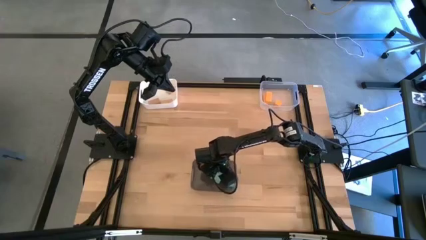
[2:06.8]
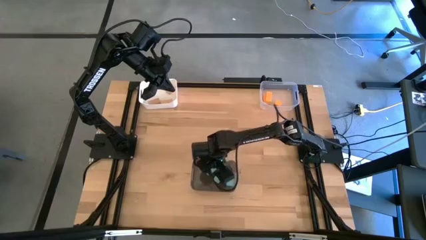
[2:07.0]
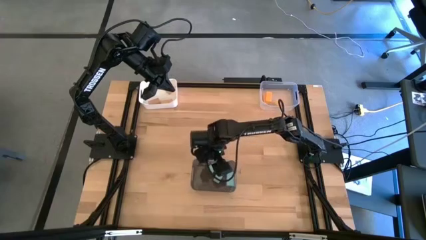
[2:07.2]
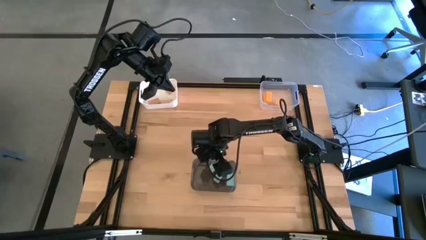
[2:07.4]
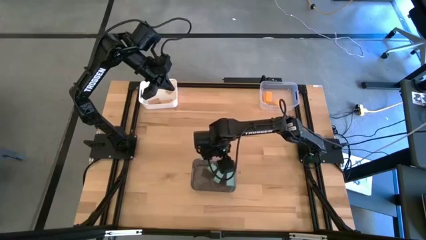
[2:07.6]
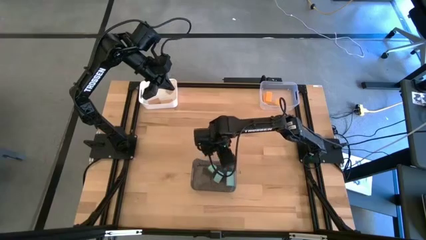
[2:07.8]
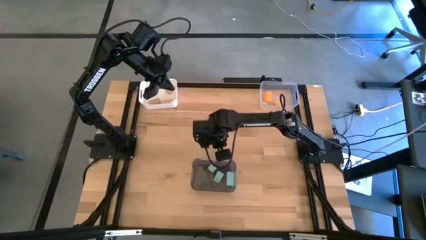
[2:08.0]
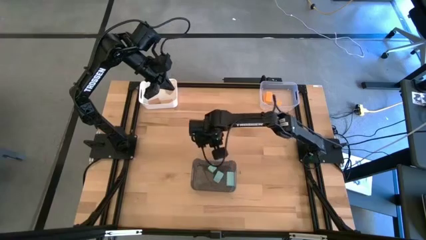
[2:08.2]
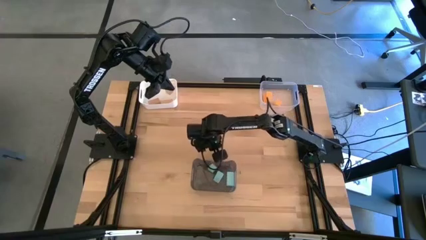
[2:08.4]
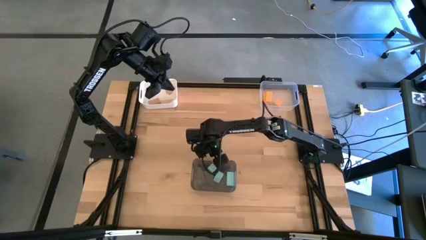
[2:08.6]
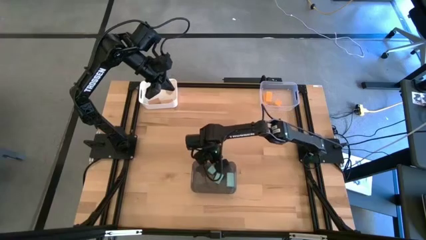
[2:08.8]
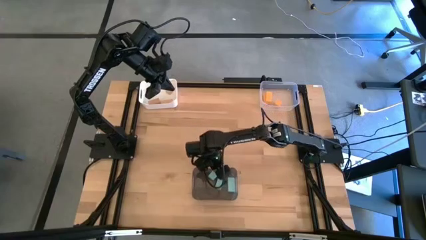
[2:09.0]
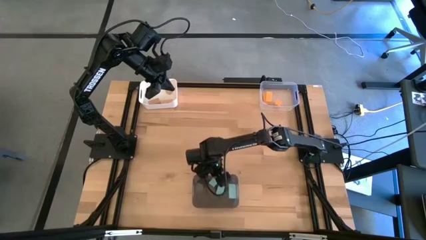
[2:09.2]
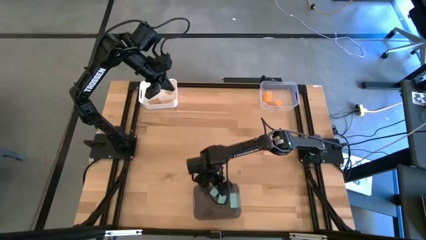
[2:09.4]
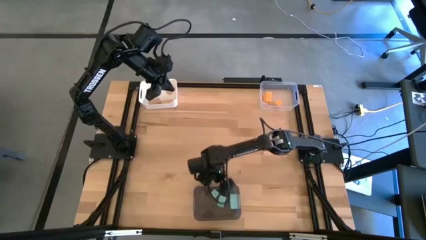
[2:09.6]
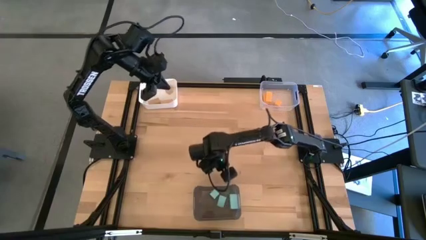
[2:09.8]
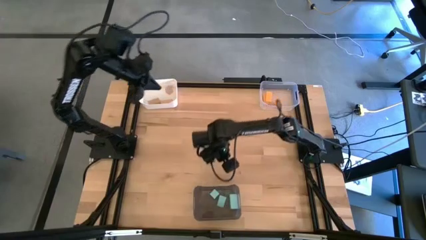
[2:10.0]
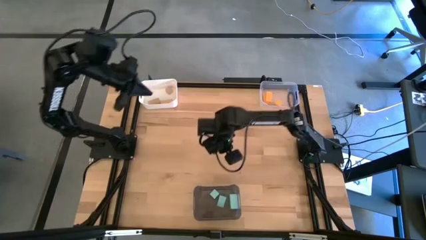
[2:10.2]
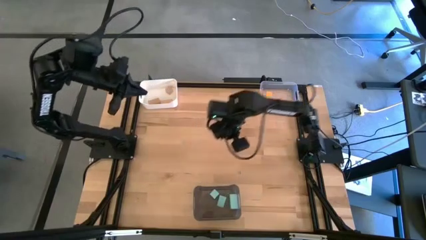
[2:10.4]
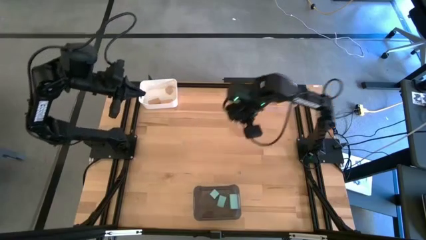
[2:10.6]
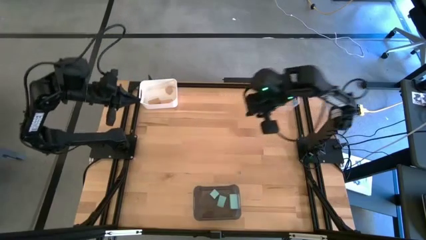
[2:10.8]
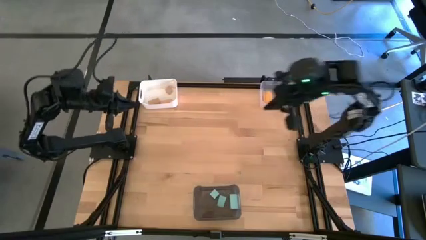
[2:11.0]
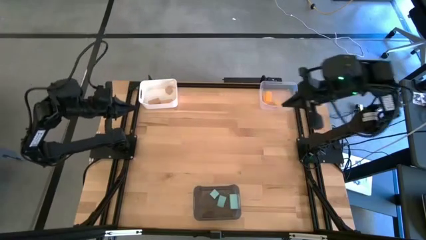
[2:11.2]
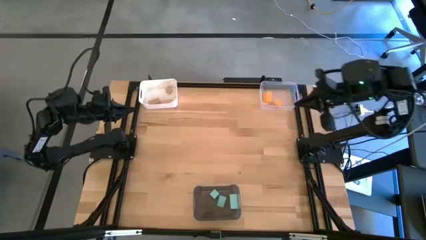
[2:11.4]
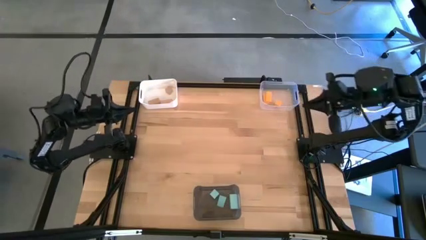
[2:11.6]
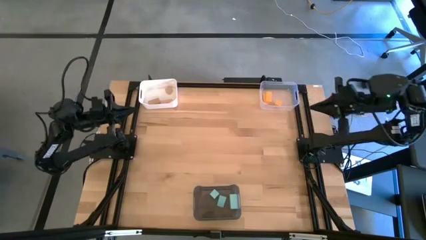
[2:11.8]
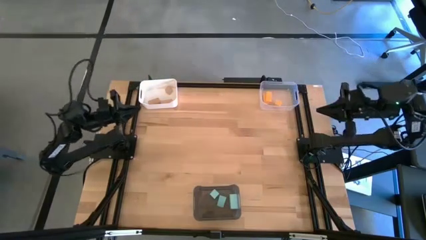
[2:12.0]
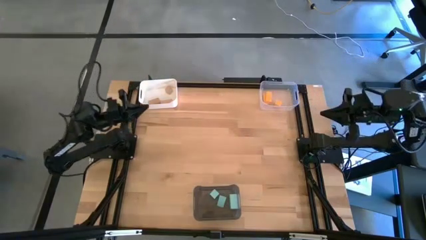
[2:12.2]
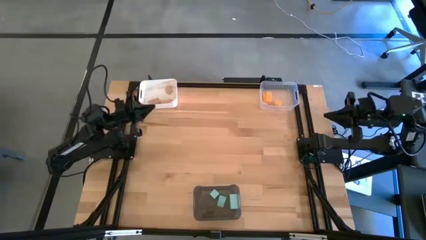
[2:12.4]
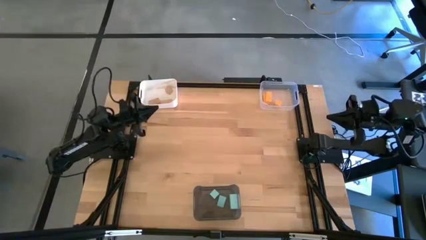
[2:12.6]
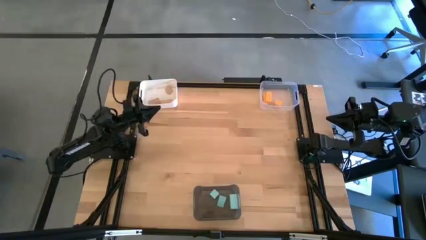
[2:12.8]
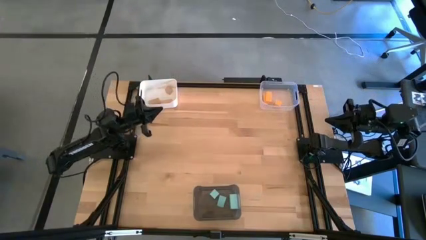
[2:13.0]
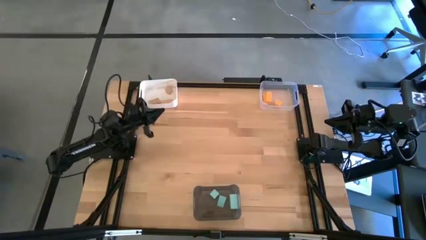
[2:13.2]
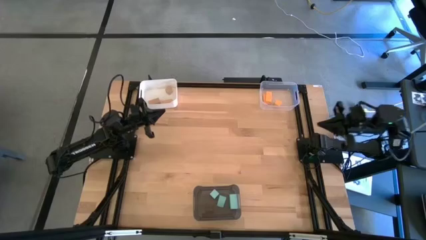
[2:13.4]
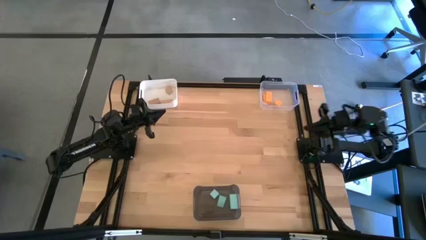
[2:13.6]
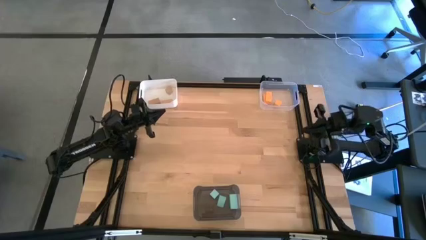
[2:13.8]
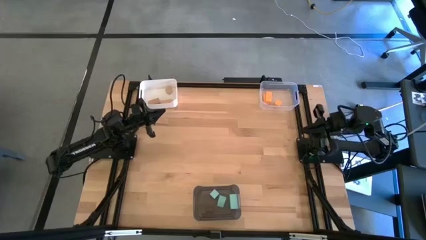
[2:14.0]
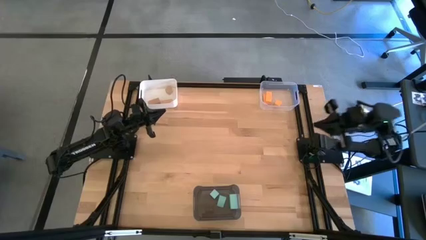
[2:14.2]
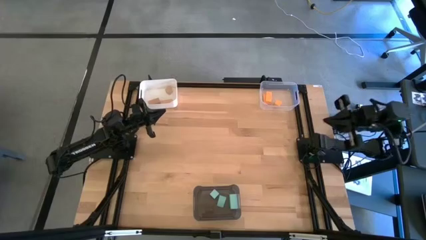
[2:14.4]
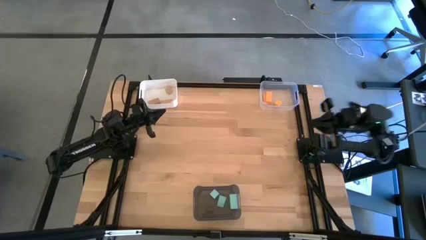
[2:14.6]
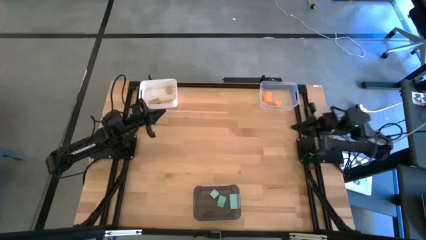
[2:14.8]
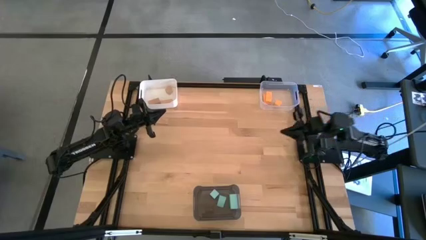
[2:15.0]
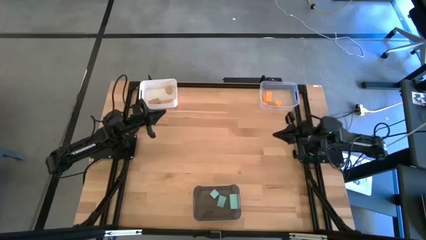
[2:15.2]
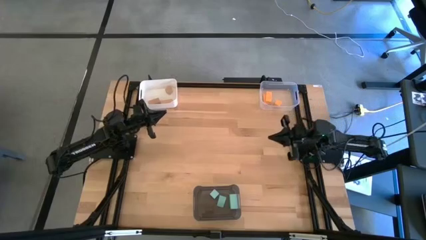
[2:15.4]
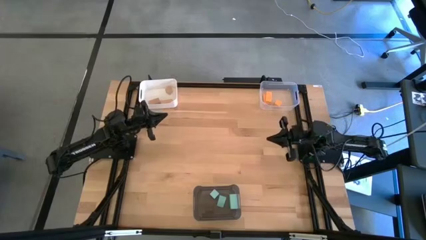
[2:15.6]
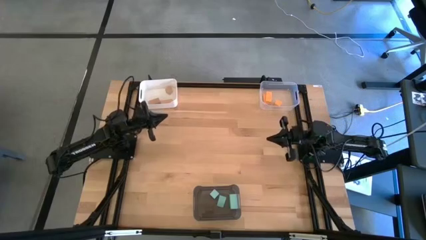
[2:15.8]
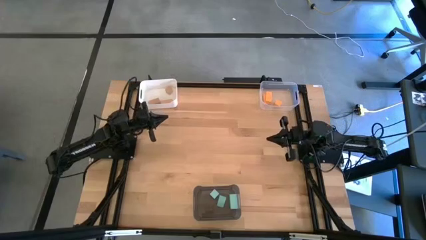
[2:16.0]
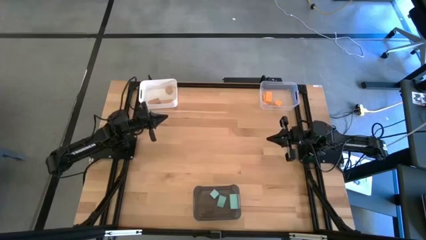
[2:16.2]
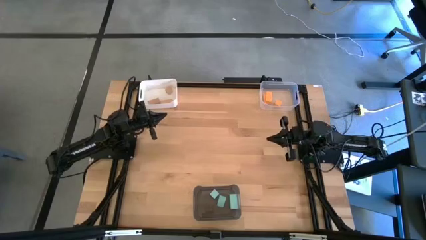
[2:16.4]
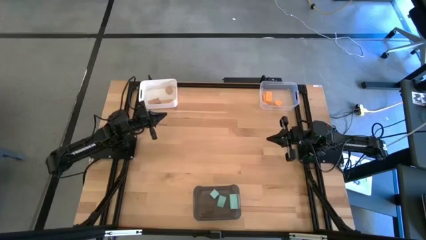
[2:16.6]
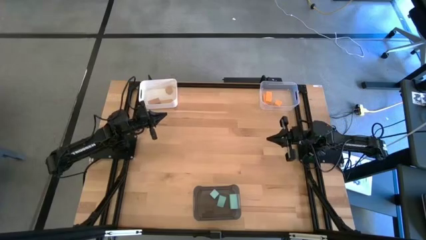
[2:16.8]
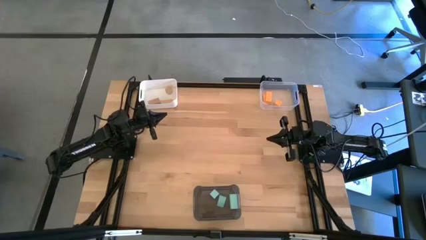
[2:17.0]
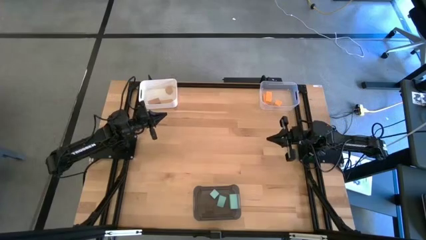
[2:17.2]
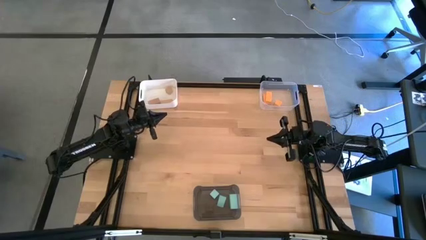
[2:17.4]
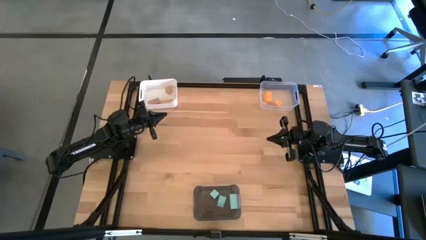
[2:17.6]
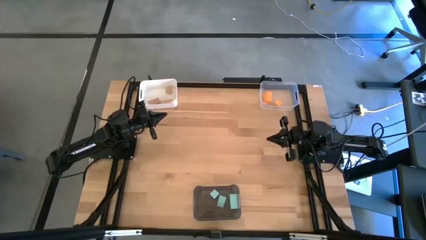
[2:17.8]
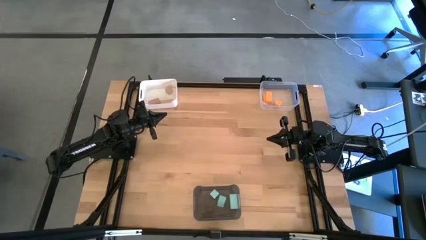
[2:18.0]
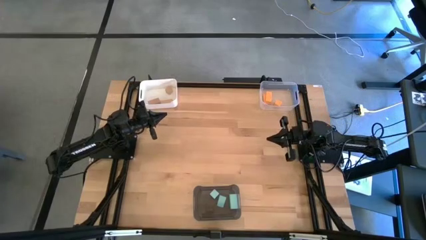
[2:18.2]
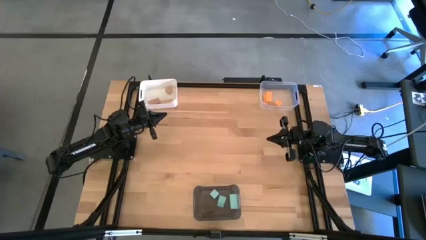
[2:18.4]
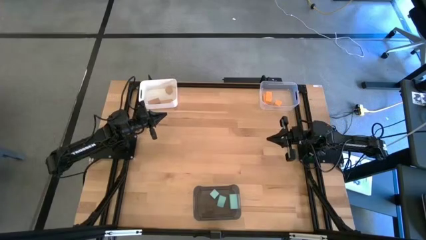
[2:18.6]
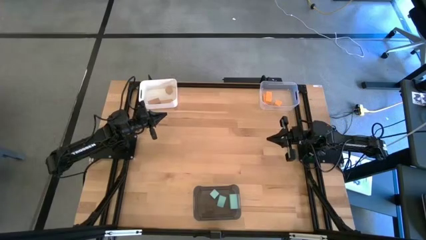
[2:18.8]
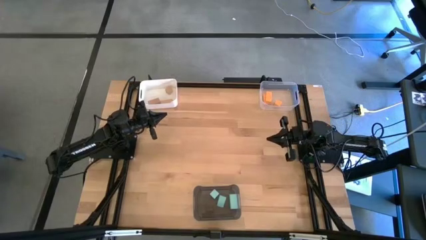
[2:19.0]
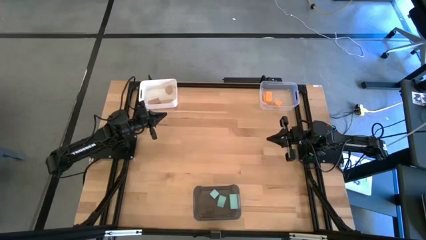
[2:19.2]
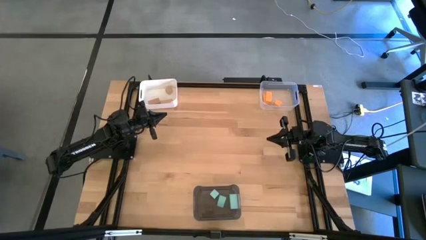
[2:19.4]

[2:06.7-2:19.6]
Task: Sort & place blocks by color
Return to Home Position

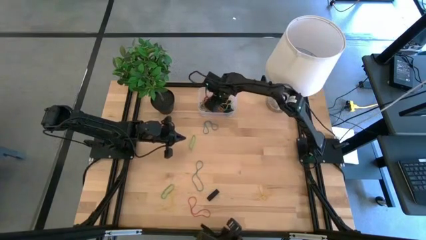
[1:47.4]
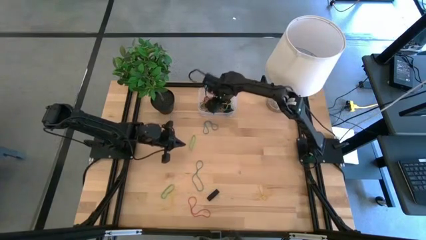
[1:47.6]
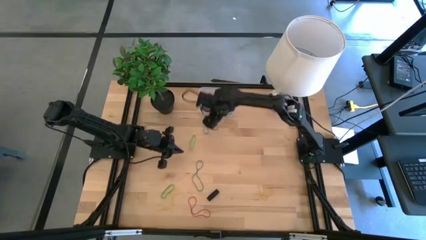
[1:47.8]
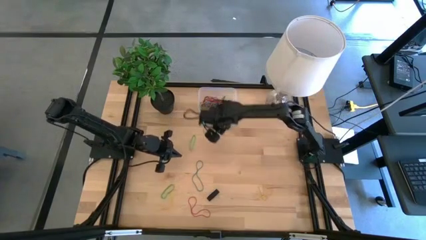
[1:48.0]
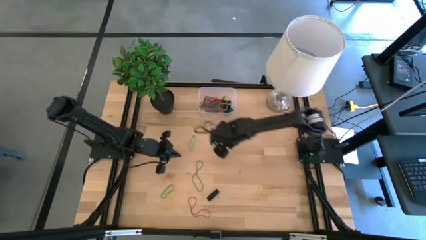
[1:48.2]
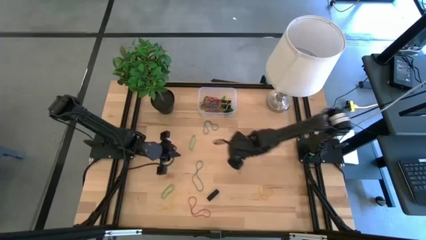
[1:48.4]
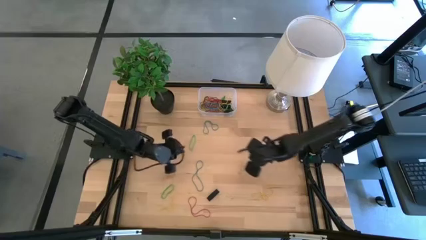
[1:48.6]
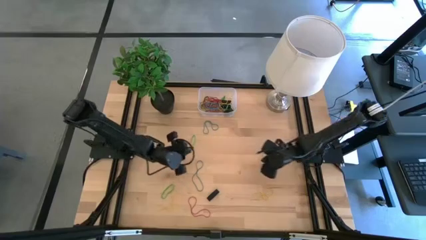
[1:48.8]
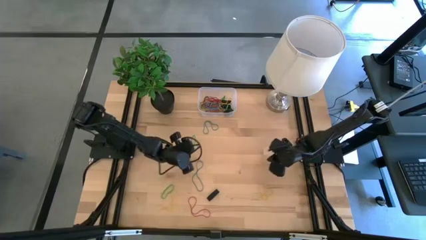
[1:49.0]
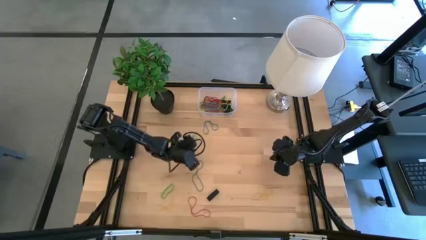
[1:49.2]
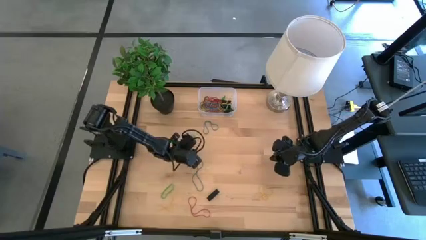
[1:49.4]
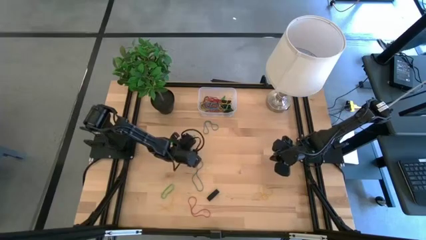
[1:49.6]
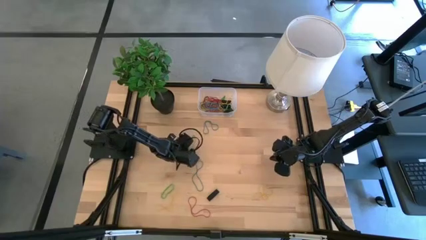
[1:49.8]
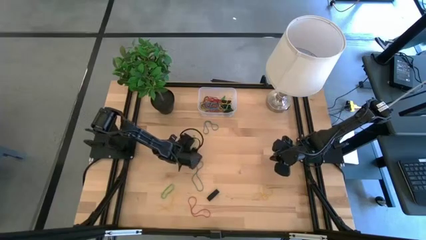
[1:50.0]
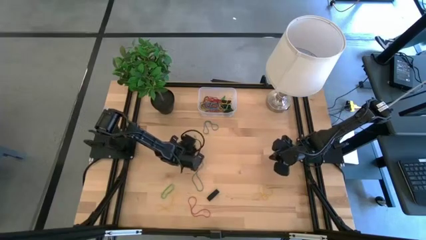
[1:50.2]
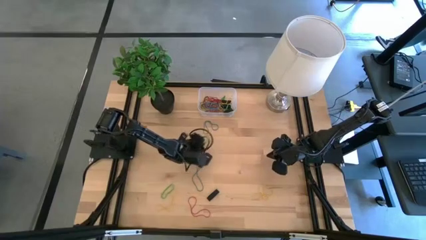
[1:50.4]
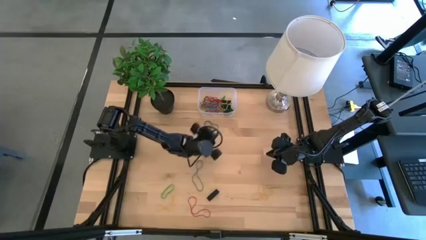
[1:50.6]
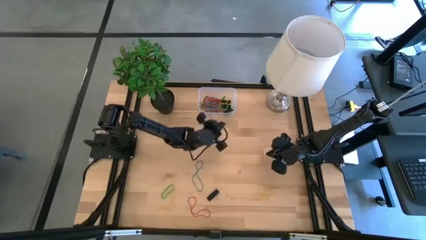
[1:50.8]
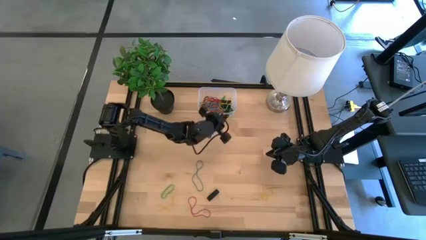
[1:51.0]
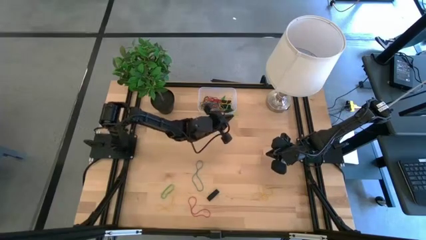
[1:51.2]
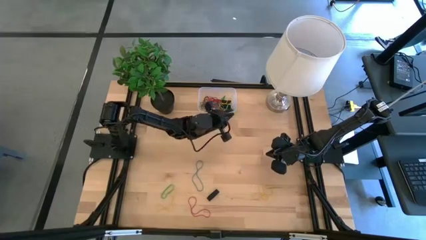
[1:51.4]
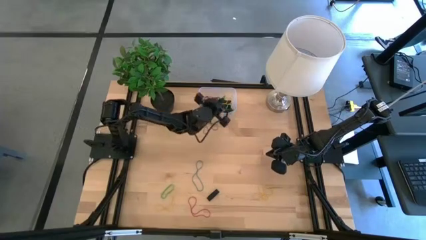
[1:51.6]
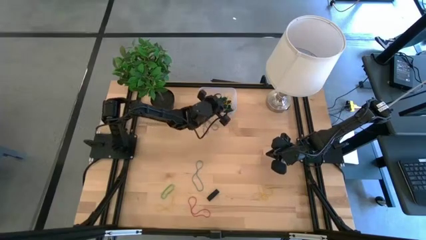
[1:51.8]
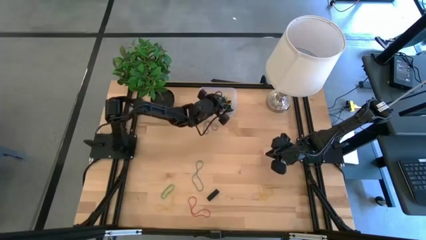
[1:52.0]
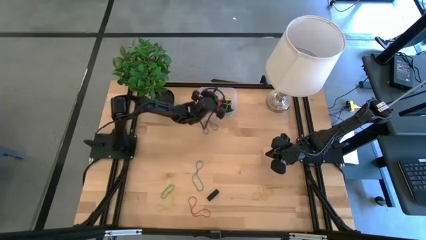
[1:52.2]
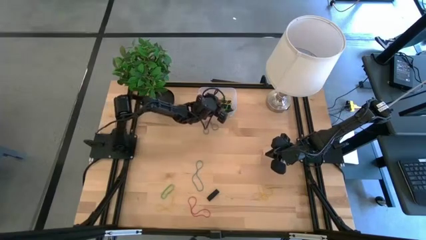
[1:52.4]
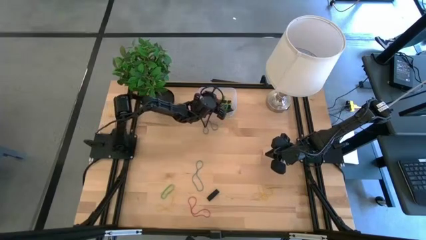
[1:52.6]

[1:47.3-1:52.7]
Task: Pick and place rubber bands into bin
Put the green rubber band into the transparent bin
